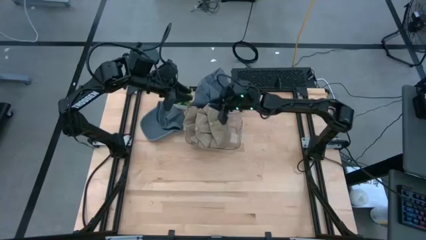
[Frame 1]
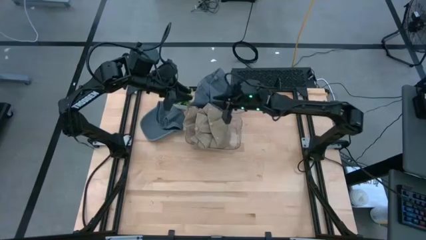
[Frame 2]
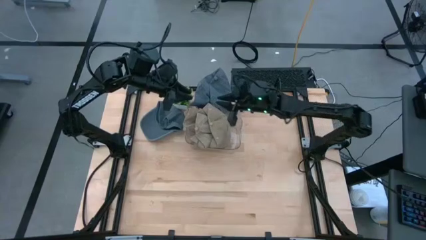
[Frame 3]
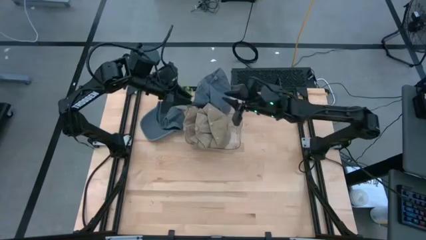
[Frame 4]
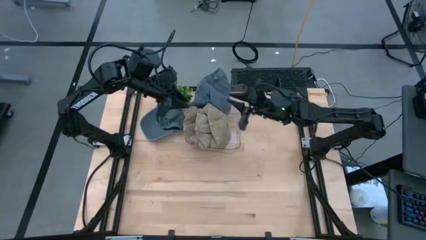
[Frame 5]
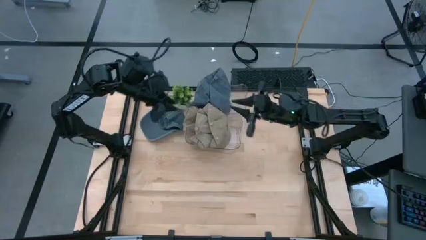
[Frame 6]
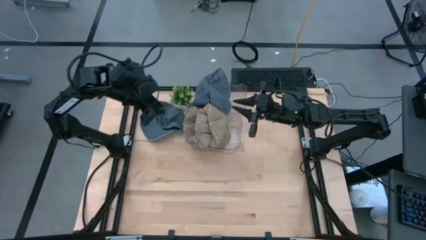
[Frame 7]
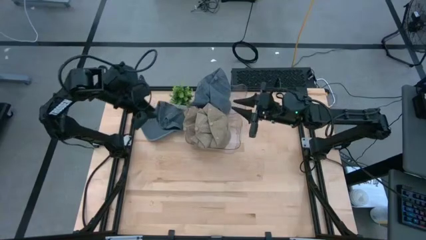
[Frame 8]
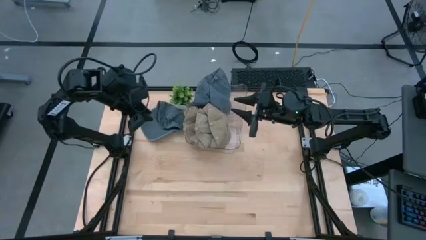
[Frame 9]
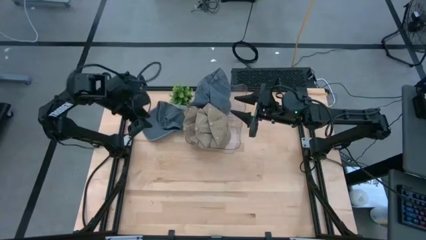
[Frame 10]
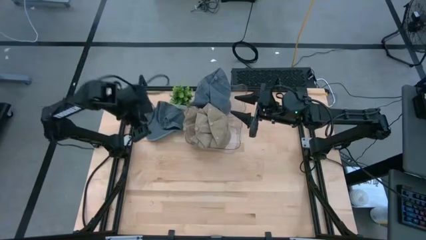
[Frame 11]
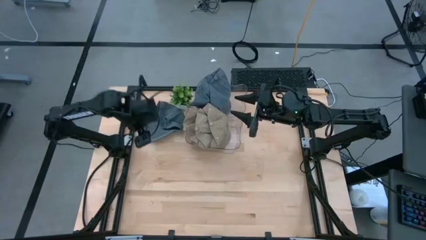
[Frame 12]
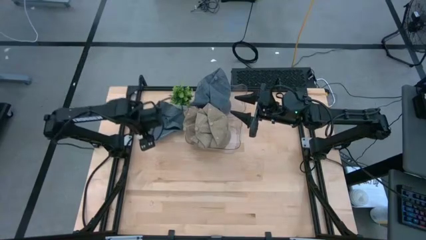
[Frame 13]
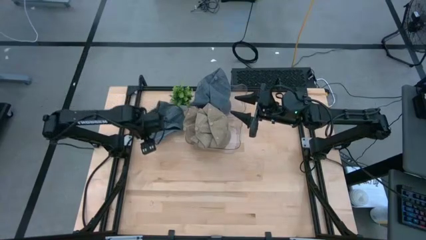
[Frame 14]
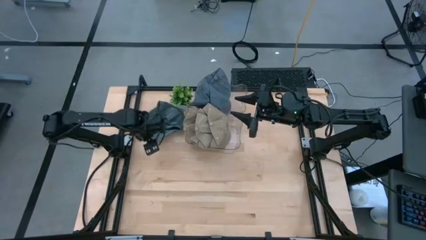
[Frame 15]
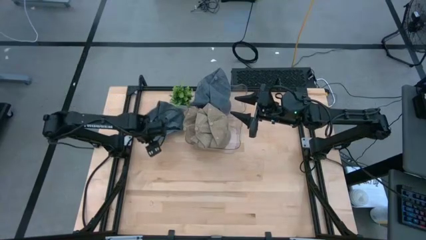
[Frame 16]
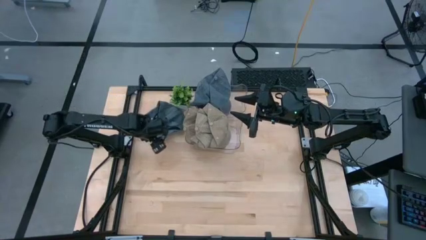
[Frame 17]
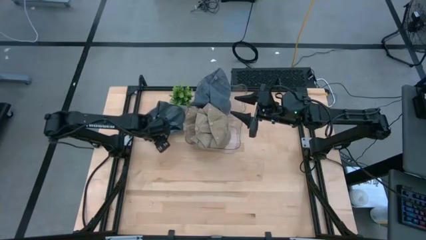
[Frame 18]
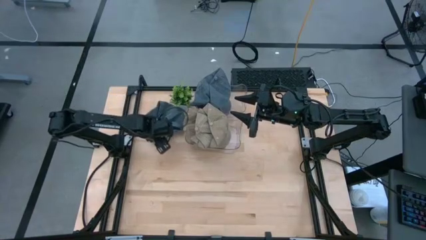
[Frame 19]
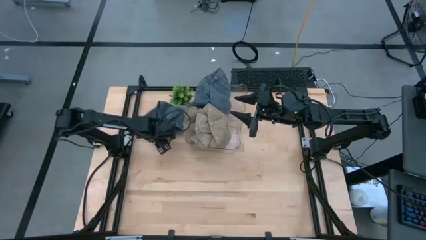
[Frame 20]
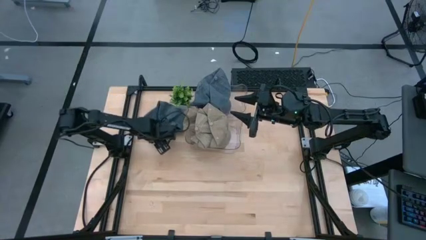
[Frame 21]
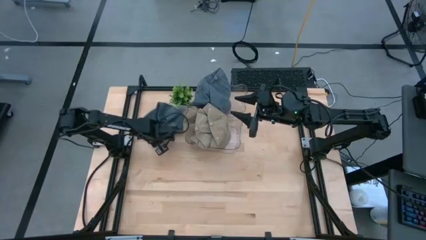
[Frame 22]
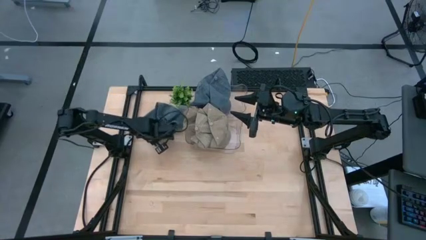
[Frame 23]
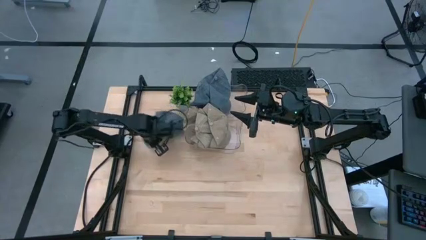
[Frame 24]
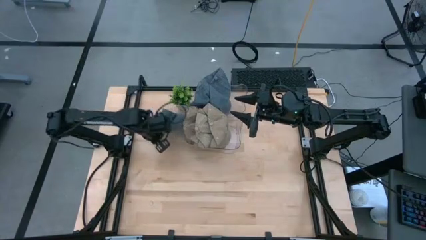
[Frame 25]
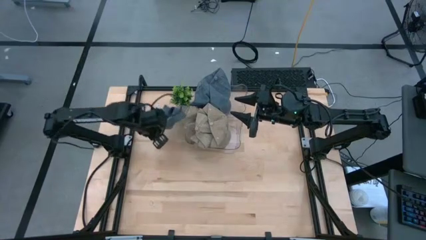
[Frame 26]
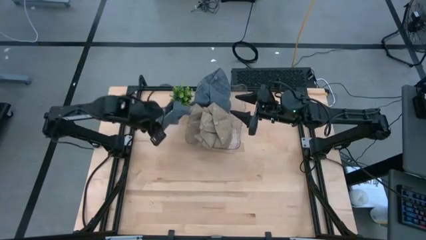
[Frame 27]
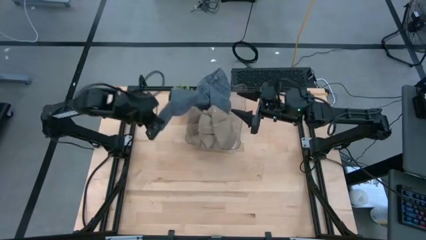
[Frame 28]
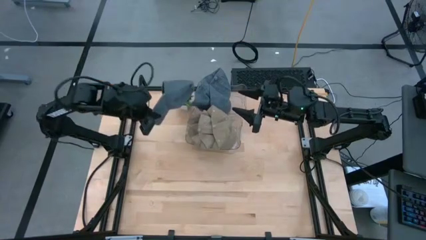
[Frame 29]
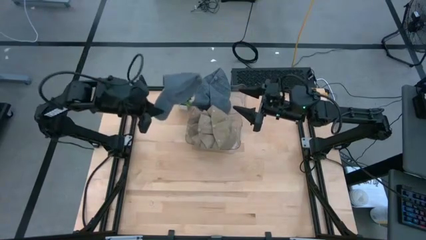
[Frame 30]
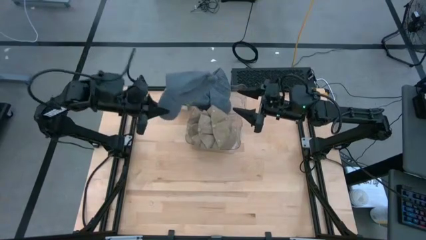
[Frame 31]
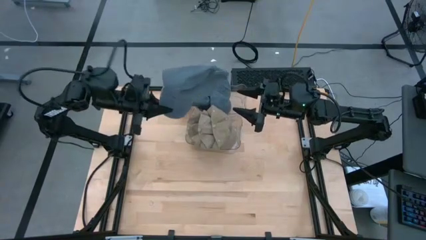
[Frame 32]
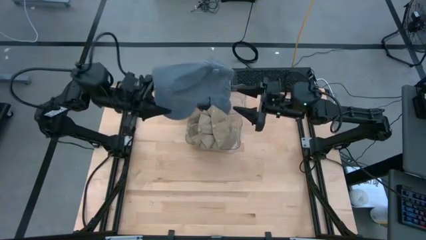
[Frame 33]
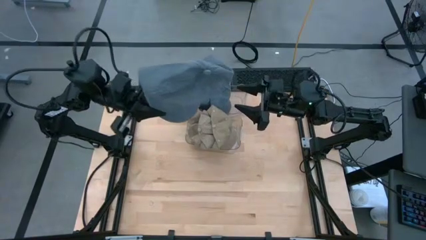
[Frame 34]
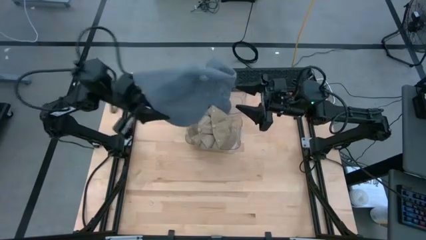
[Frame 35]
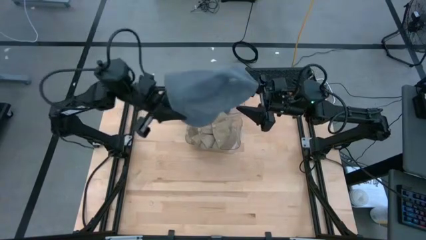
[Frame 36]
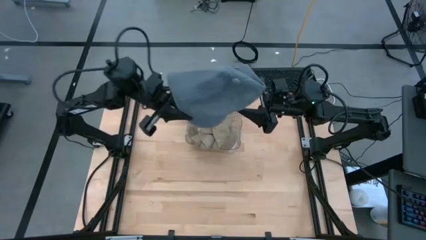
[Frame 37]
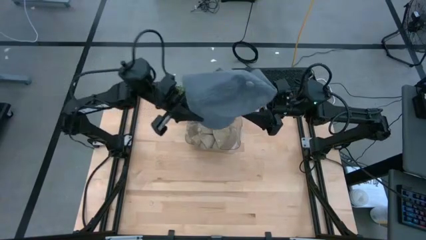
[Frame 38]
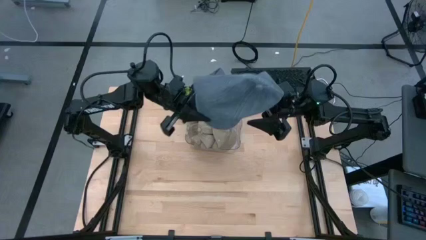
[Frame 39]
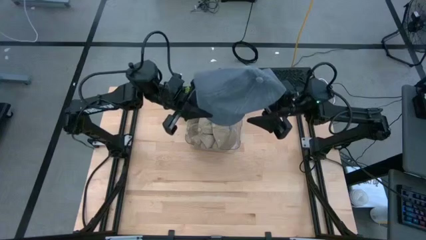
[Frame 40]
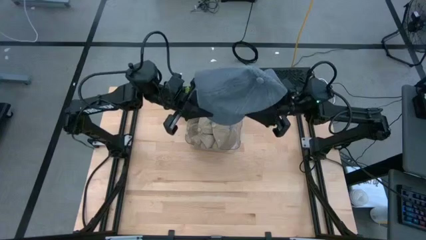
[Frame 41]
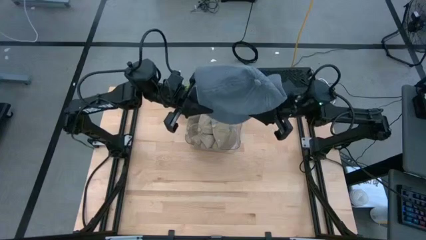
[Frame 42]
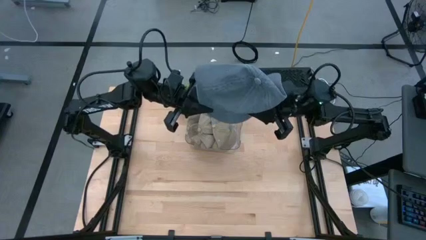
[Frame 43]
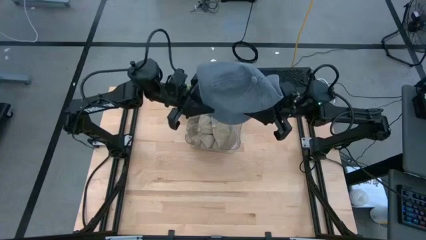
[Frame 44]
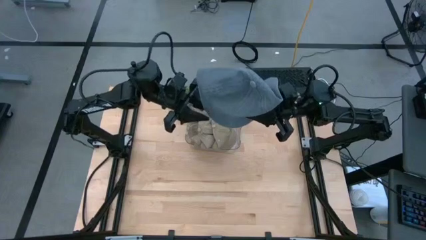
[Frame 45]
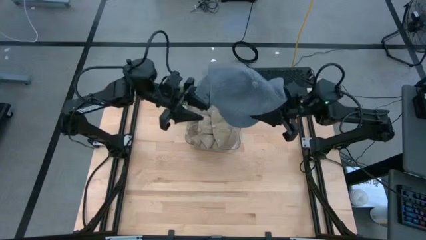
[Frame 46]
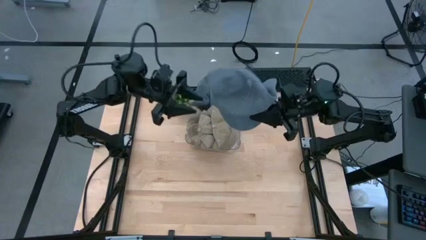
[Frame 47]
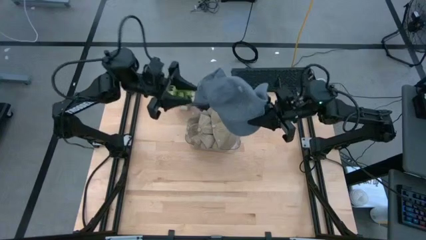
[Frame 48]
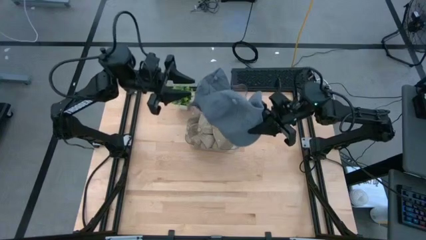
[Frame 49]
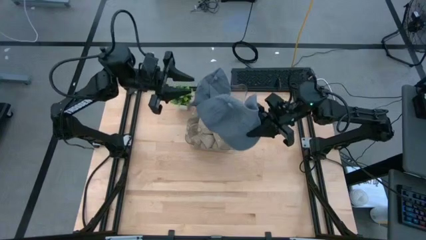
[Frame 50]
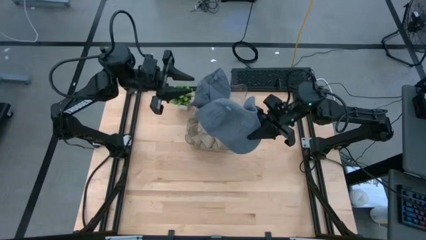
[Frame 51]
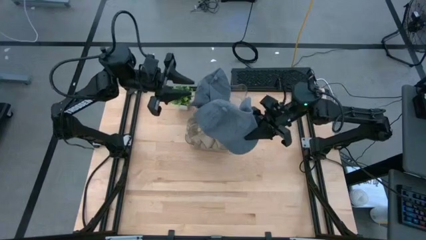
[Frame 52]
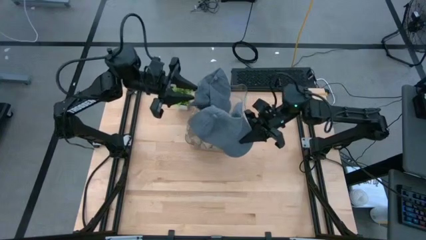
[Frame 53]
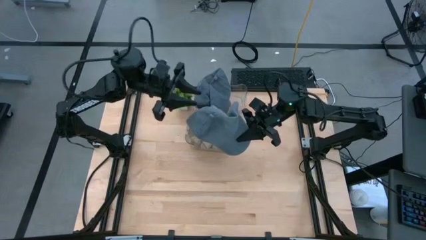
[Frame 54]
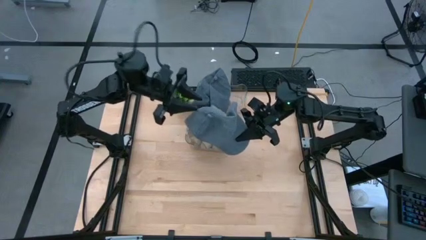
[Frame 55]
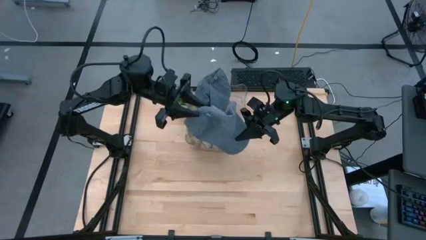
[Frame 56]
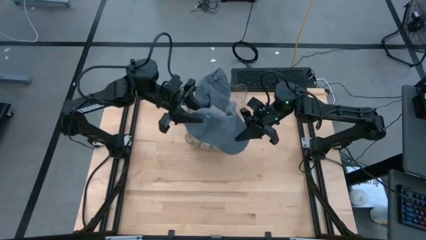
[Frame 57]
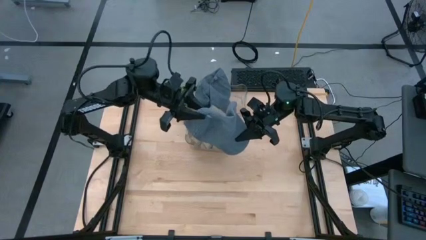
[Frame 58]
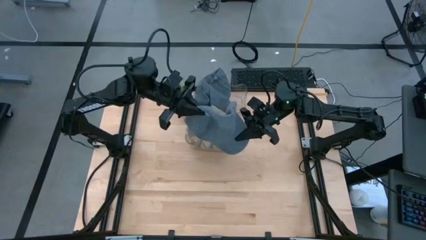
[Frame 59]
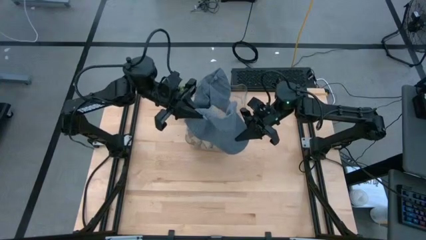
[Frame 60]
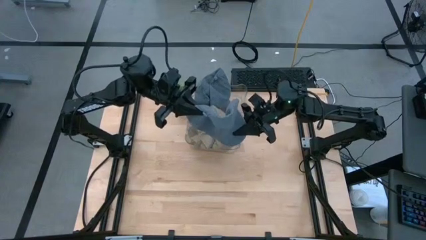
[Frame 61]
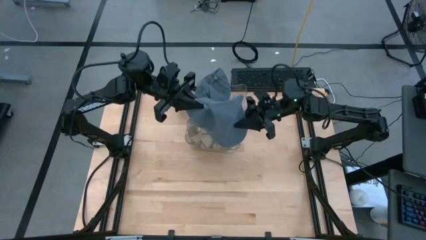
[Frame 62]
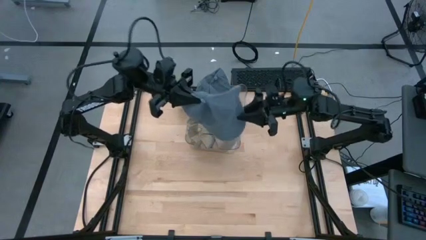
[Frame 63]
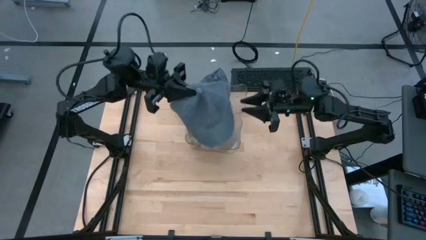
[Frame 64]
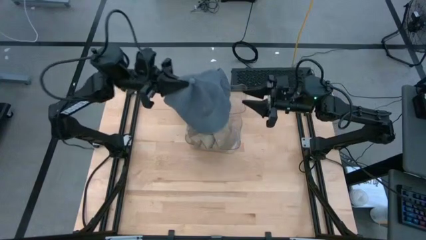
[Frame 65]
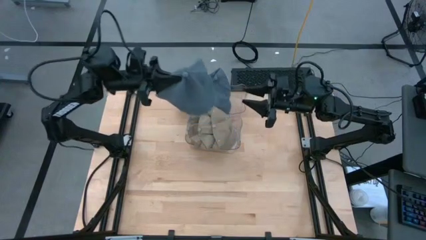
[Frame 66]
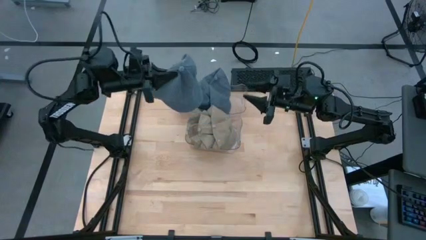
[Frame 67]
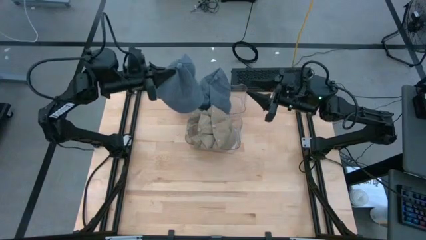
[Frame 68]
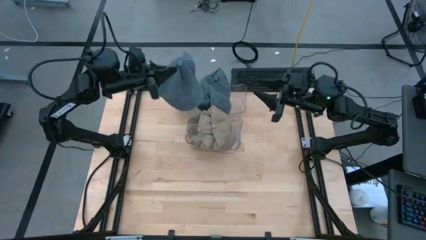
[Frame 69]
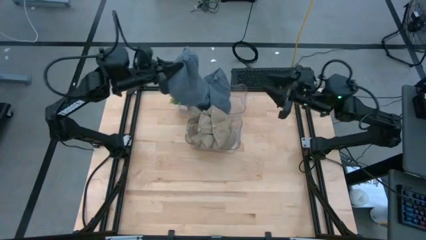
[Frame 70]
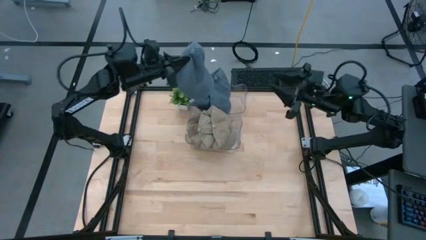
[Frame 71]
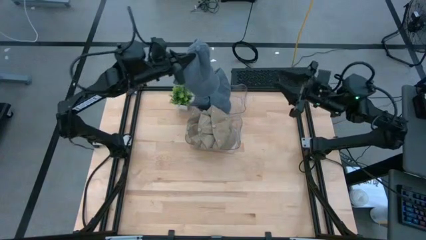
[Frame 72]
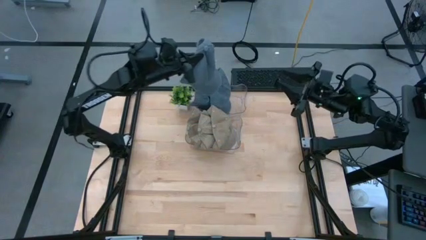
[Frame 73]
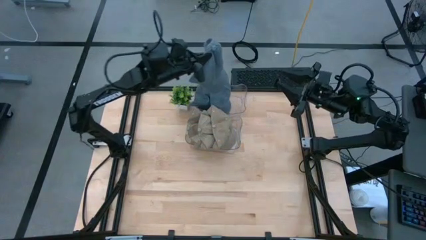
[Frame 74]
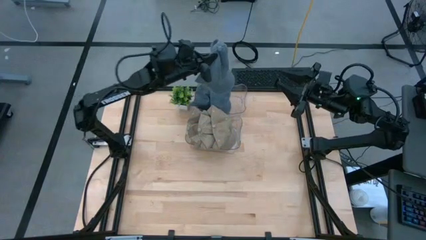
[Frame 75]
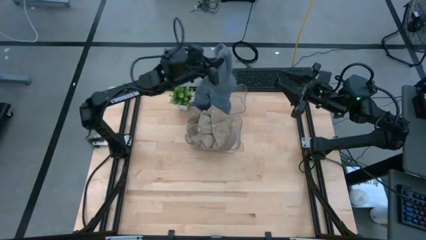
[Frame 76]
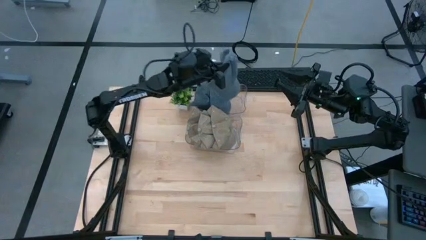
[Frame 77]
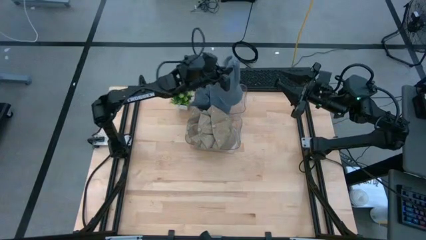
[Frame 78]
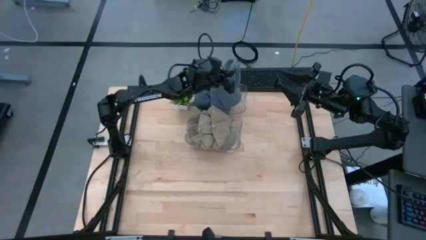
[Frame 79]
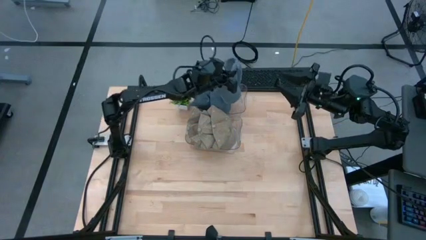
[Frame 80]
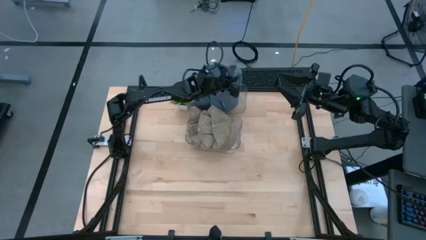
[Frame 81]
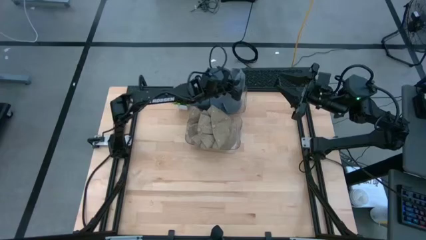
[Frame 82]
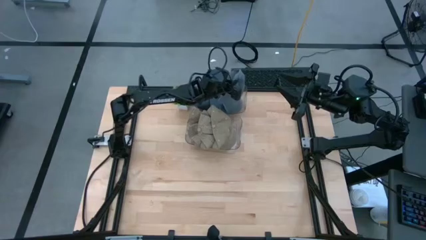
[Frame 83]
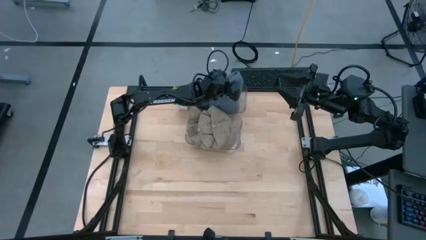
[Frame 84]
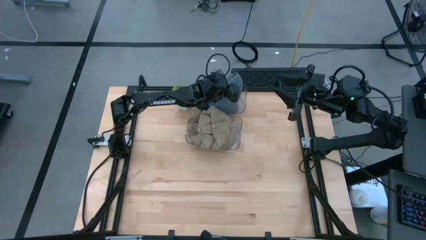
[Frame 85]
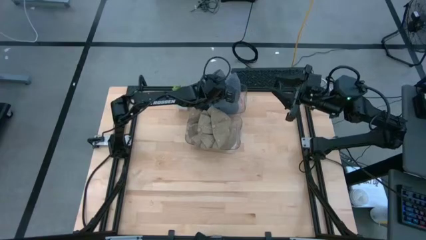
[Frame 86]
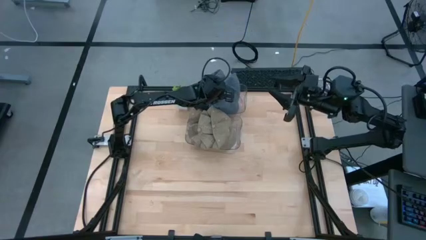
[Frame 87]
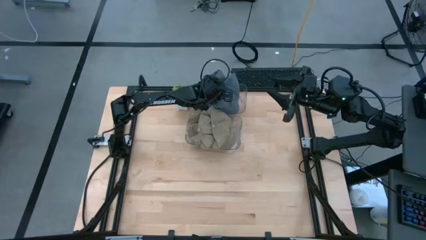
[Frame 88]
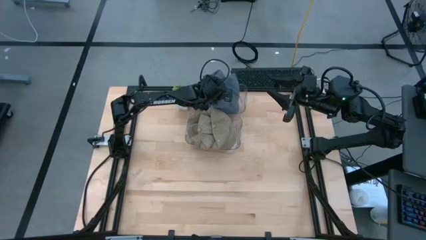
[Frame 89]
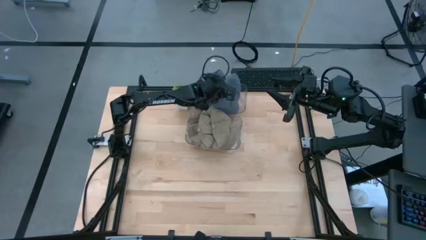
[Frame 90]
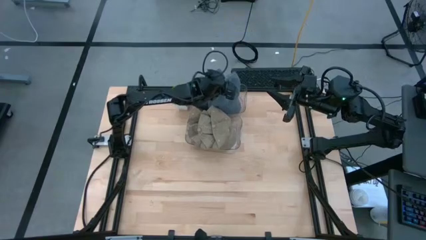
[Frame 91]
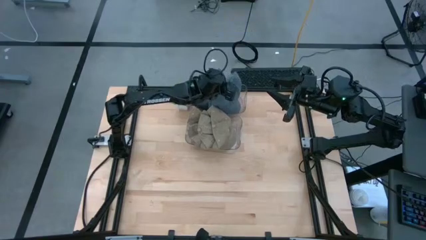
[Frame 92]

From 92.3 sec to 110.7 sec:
Task: Pick & Place hat
Put the gray cap into the top transparent bin
